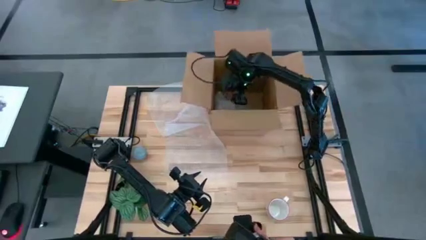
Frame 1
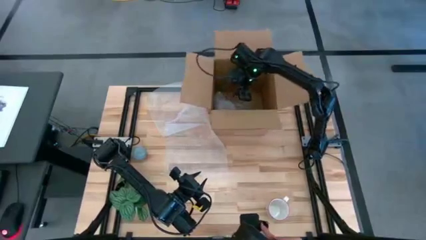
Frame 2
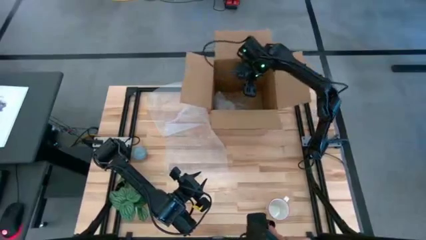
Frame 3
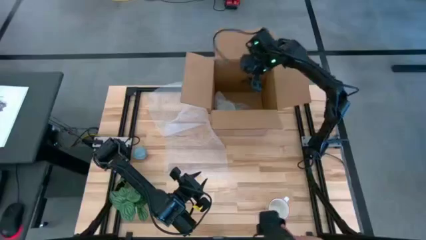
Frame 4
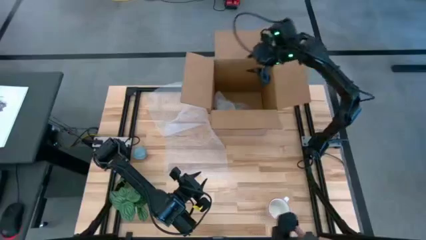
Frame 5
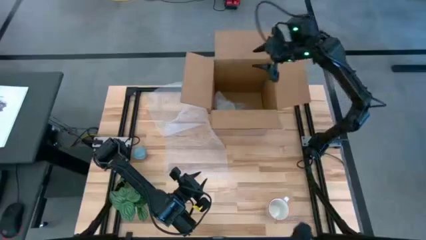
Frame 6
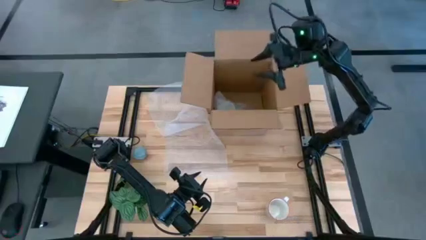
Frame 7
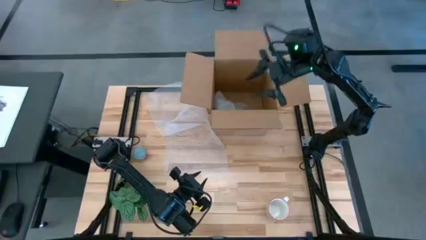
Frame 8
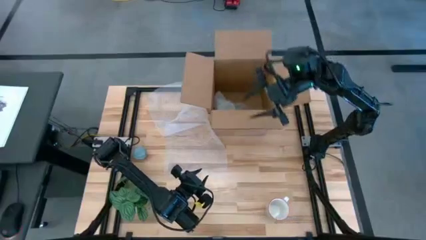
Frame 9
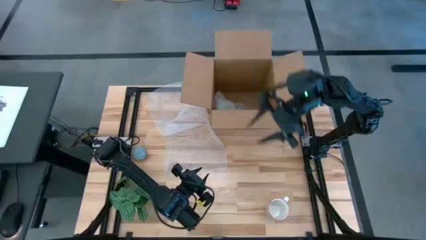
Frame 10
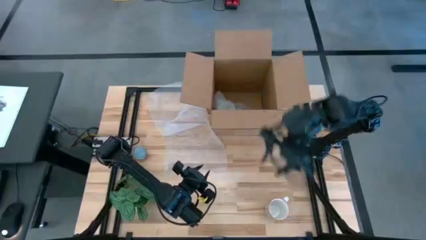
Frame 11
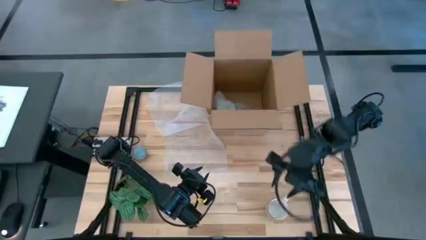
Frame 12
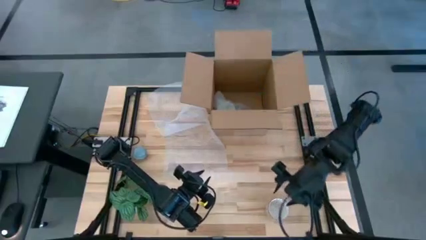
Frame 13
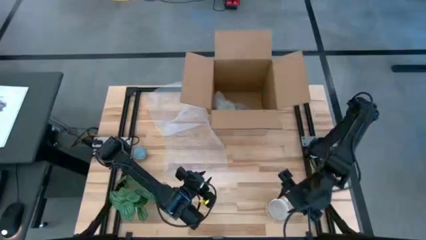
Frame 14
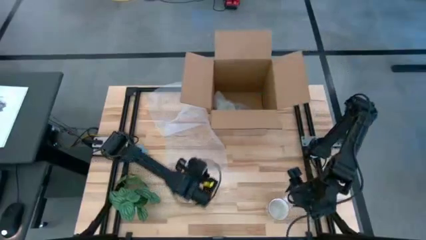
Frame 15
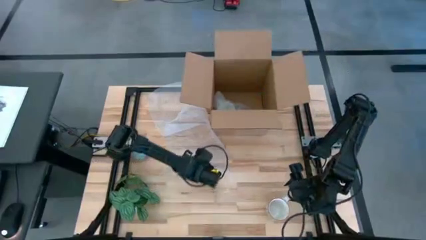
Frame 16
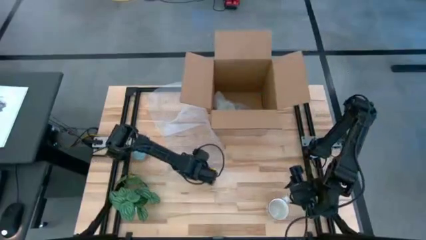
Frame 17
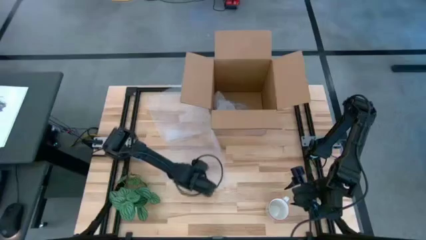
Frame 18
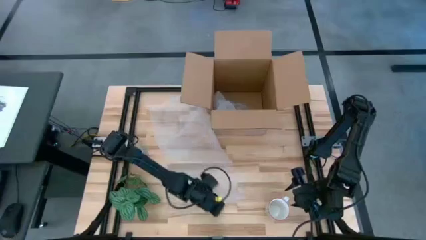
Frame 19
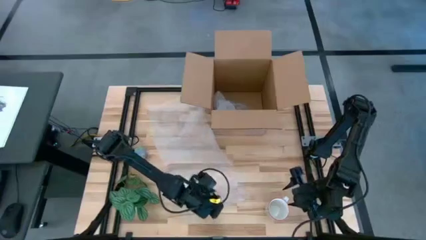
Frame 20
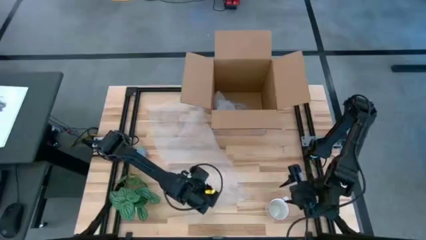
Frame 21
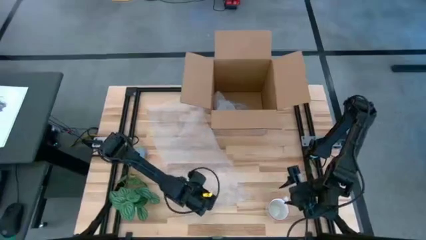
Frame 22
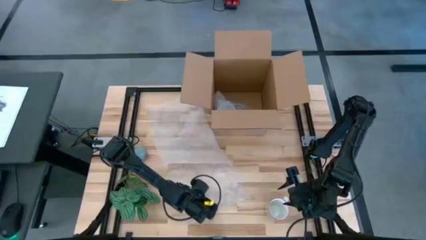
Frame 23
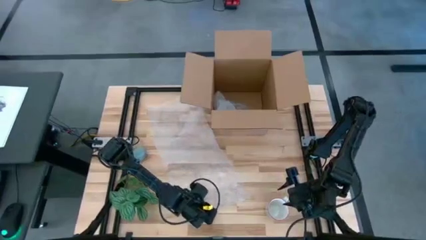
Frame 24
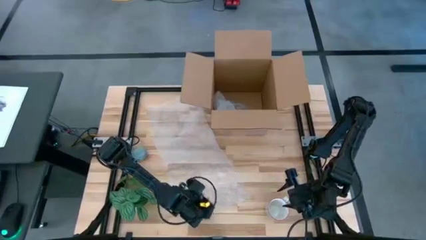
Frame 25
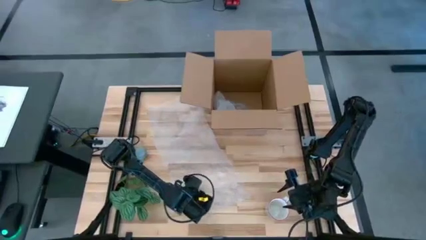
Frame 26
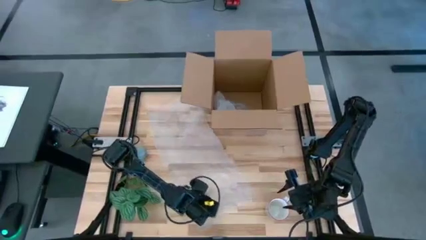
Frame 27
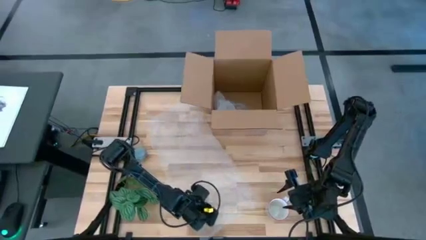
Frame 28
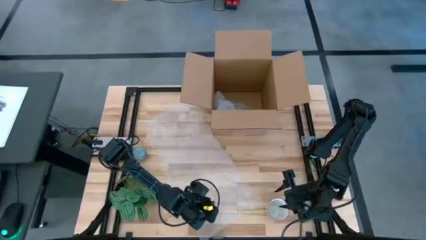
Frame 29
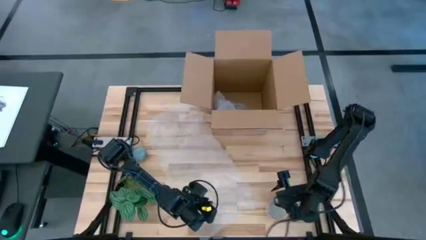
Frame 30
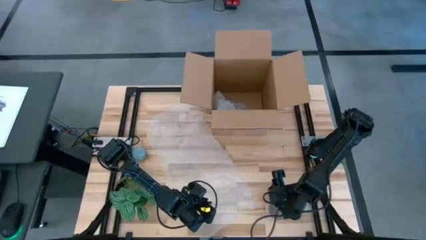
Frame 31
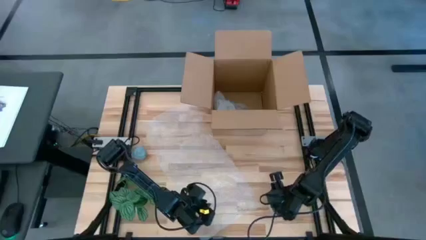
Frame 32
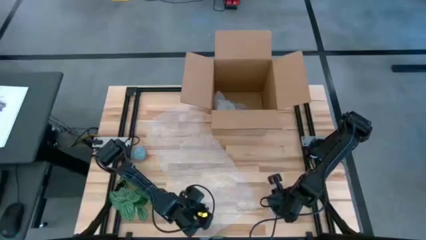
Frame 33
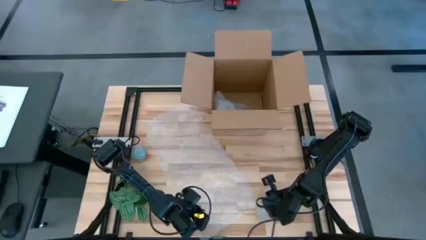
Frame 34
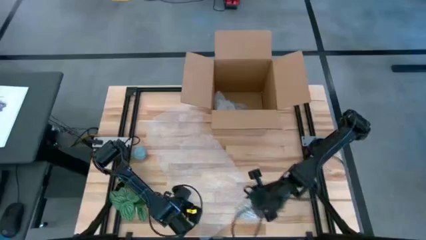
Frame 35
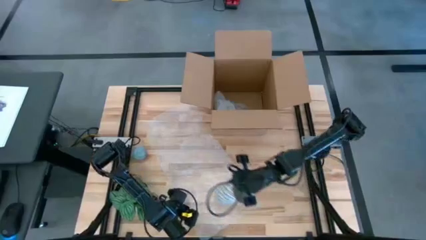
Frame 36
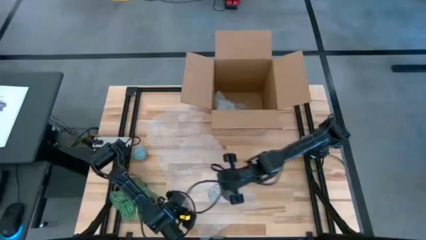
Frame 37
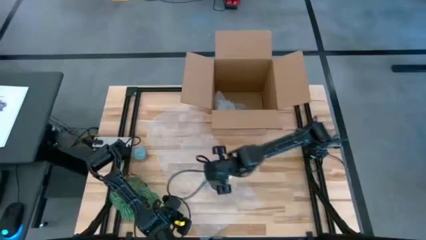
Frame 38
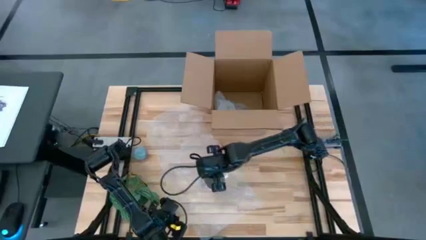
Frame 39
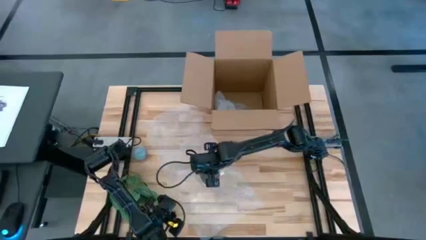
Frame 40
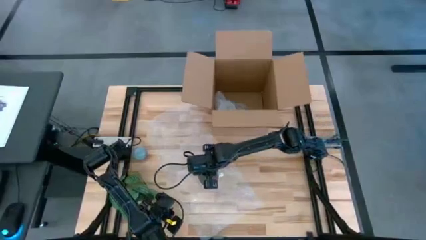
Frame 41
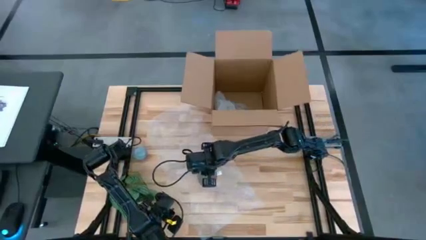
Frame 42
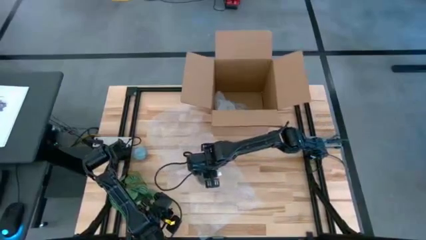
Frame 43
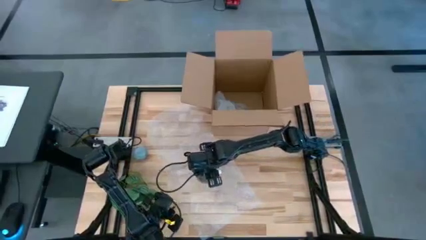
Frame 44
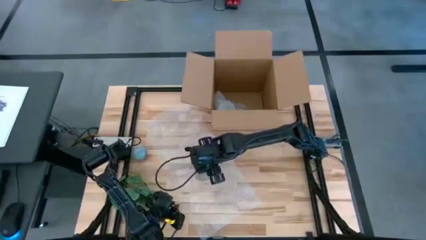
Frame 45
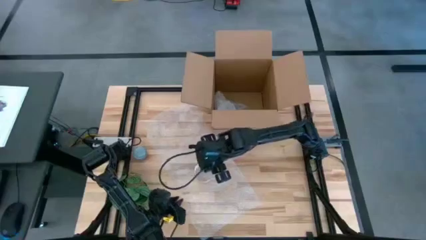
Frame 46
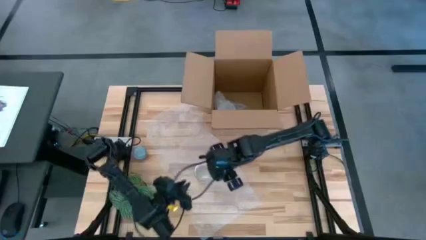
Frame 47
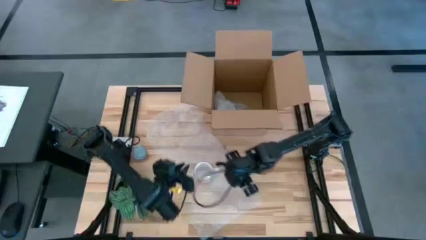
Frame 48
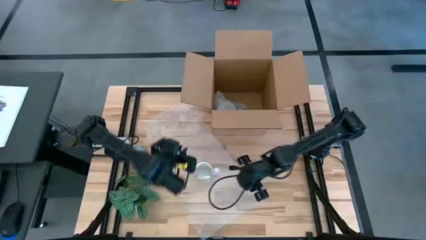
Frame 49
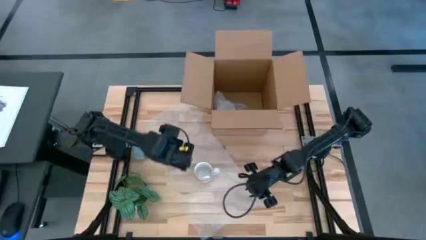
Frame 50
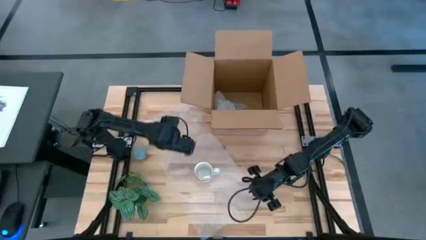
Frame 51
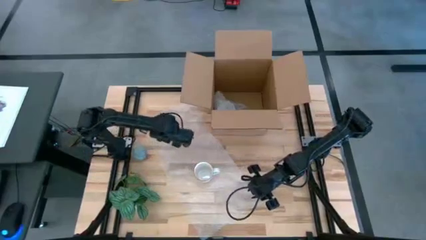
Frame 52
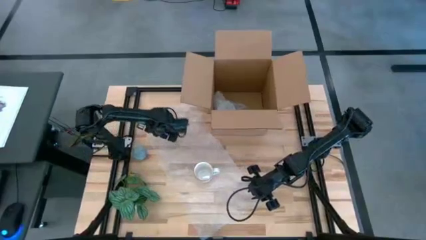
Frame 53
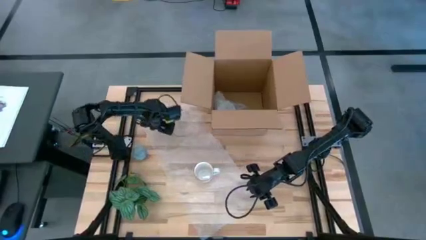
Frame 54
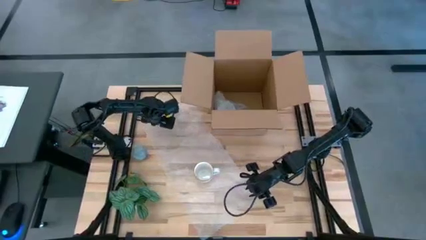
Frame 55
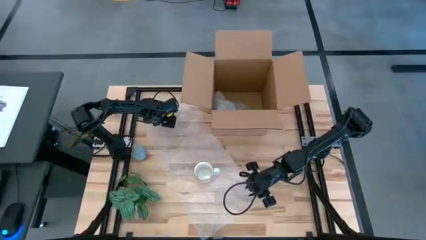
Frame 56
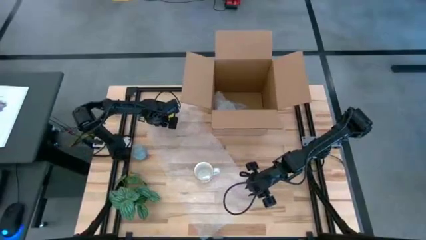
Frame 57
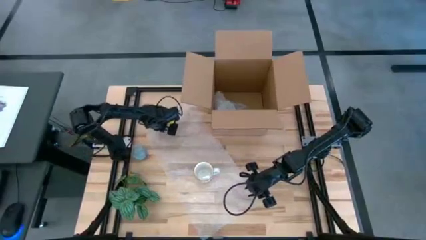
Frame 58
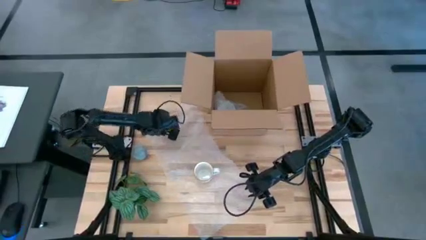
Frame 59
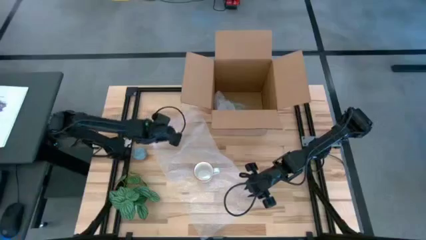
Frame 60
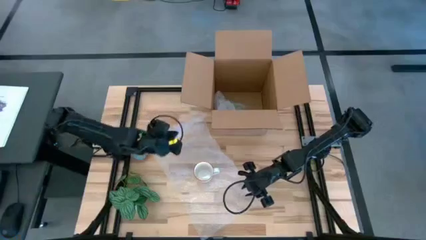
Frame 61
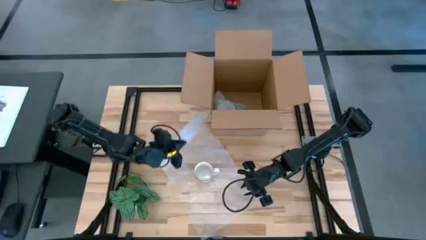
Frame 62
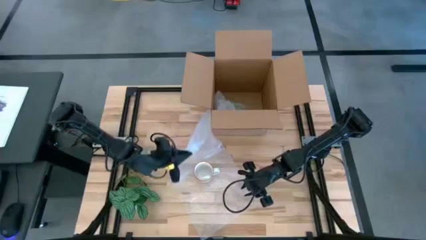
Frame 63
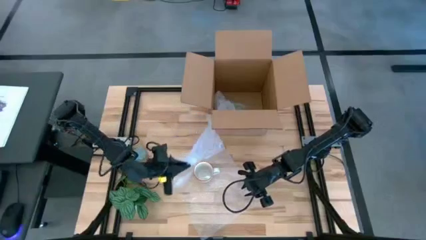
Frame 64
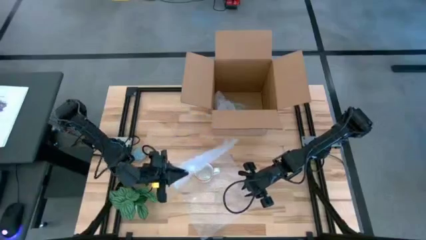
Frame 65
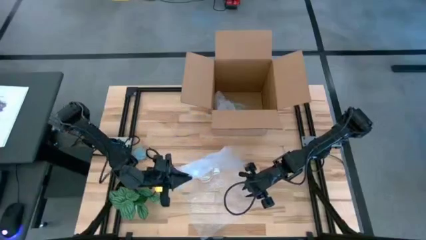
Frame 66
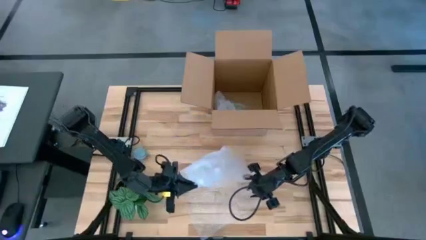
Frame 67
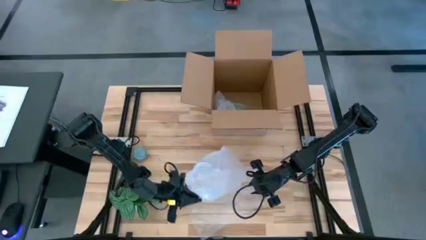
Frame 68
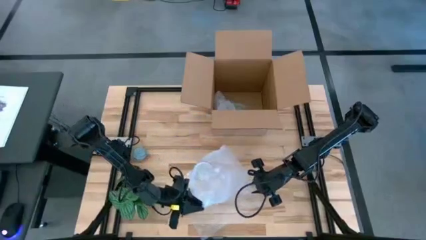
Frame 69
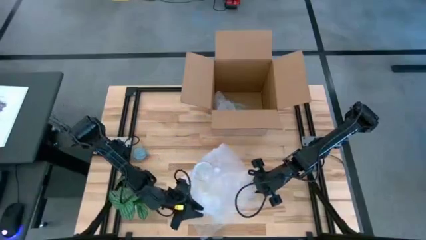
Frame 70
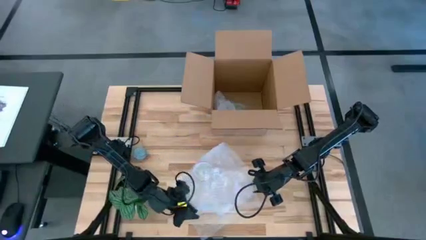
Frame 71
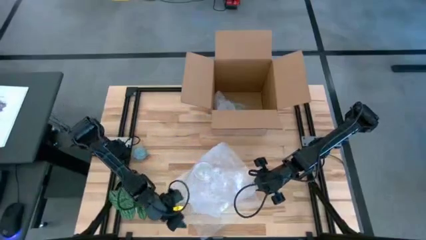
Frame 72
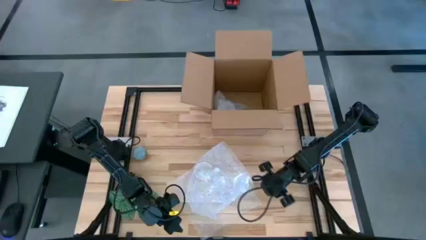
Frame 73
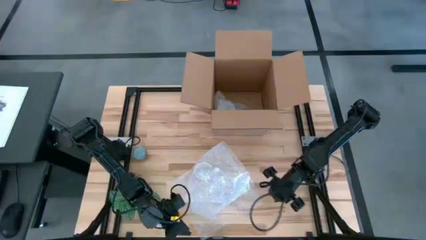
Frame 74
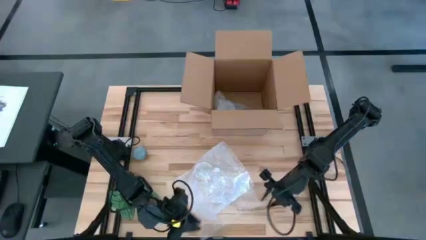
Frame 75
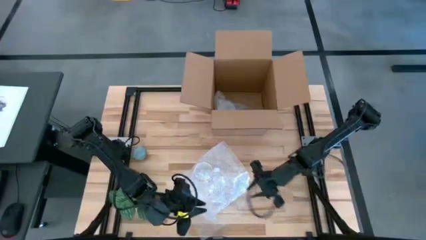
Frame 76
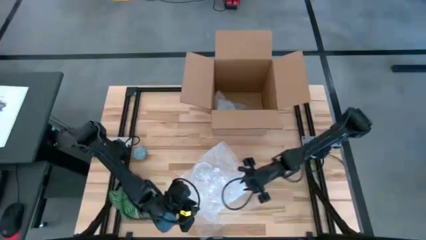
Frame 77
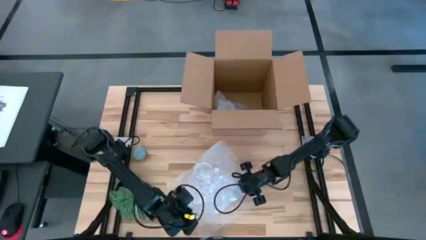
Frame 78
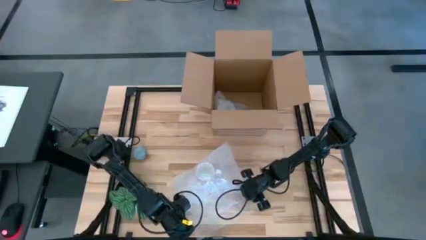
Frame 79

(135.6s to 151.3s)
Task: wrap mug
Wrap the white gray mug with bubble wrap

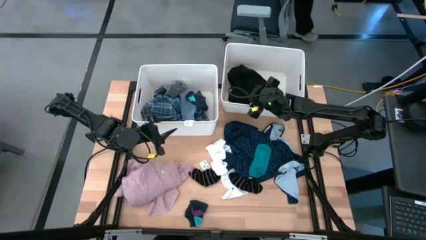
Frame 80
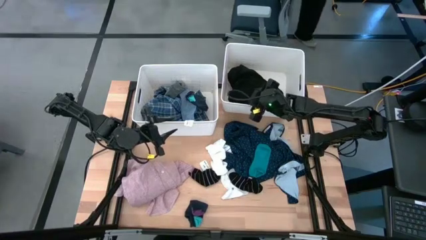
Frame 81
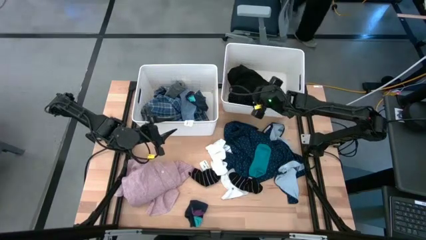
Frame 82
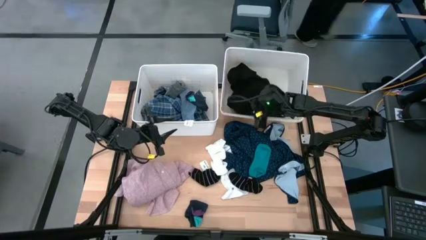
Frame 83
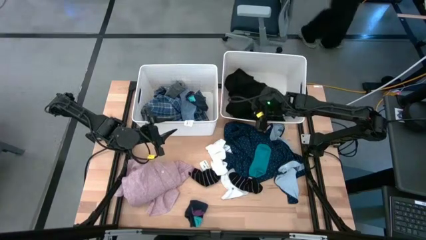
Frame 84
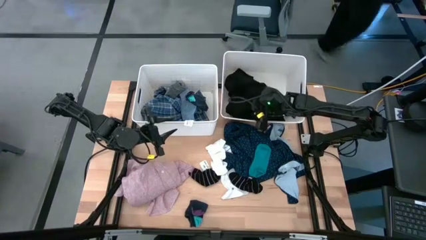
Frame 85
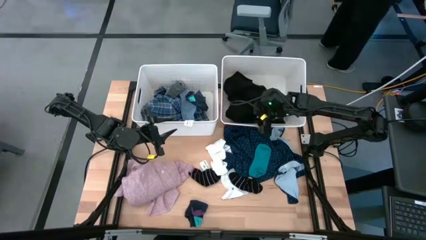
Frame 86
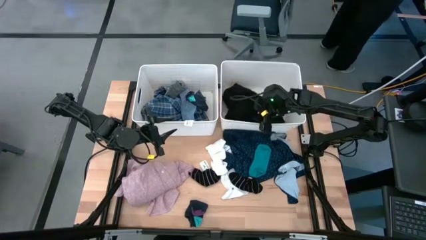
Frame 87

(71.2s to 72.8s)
Task: Sort clothes
Adjust the right white bin
